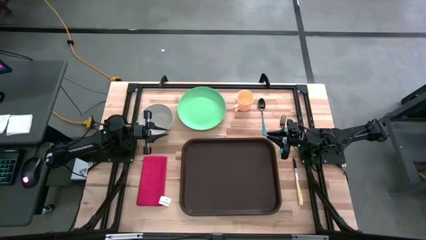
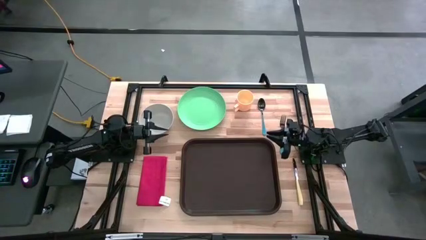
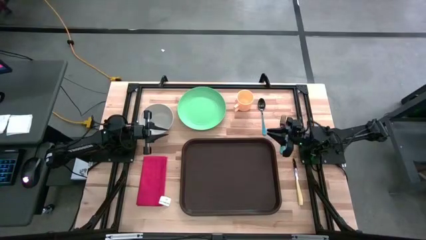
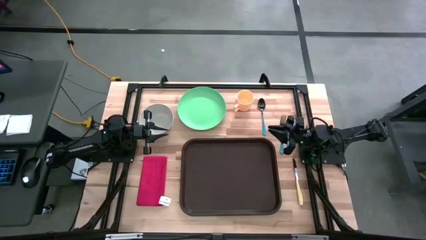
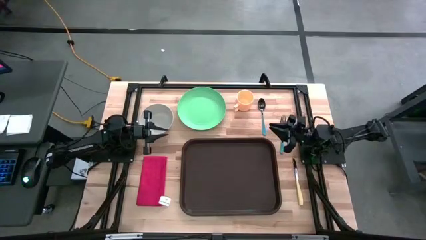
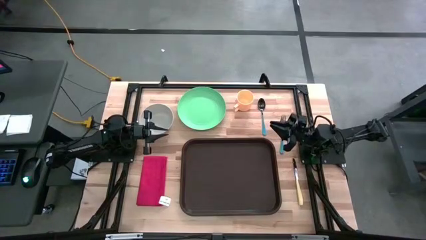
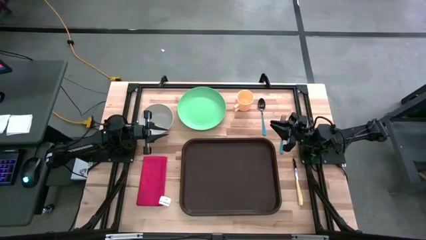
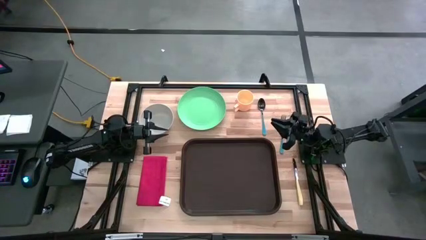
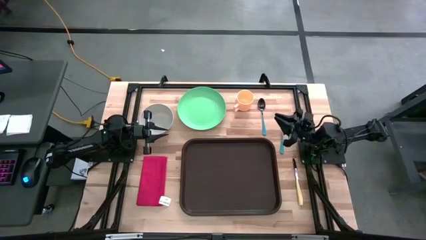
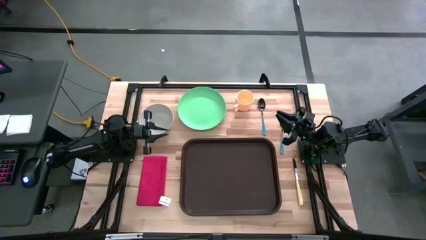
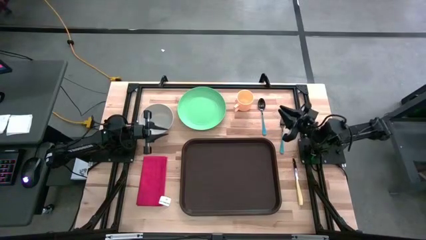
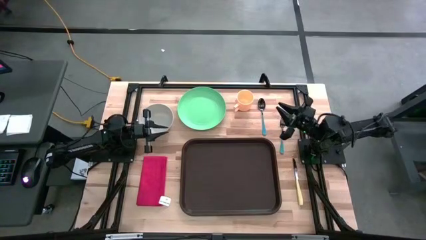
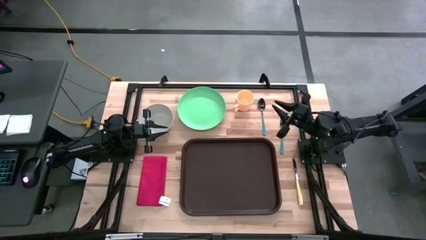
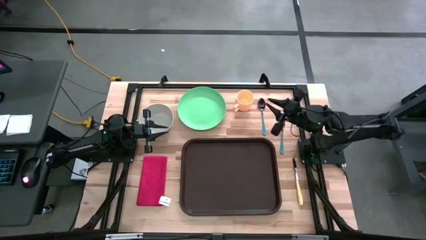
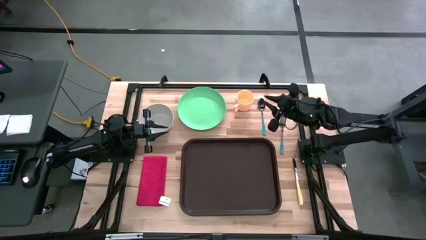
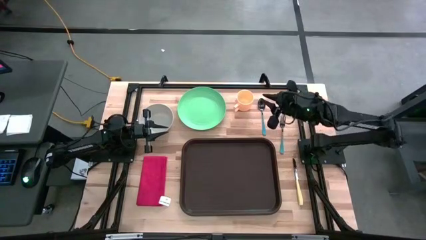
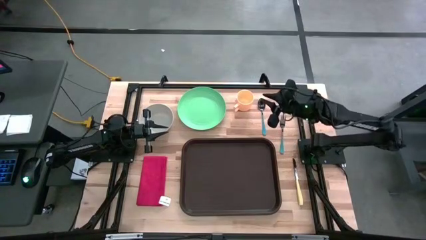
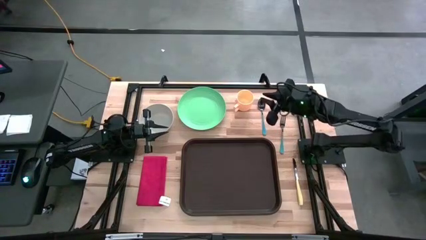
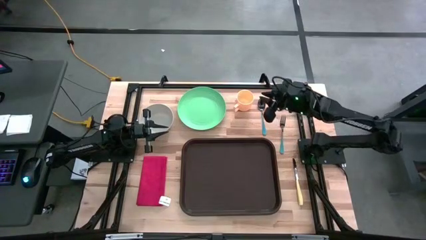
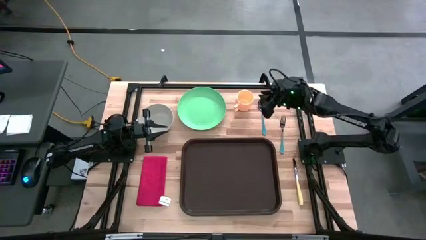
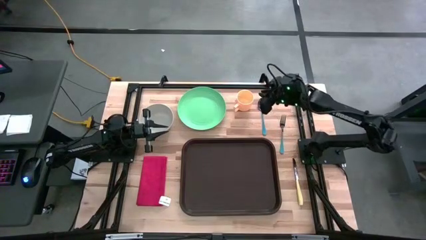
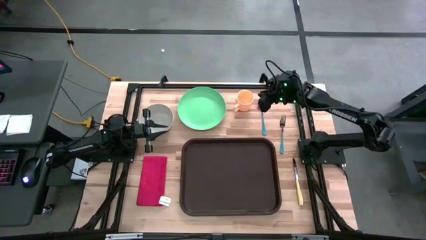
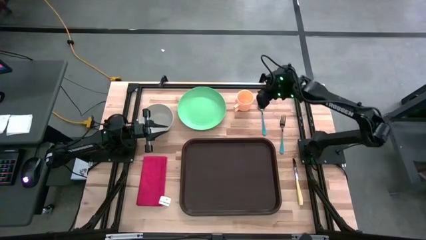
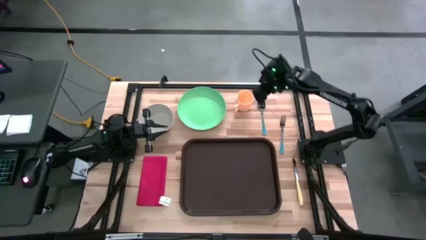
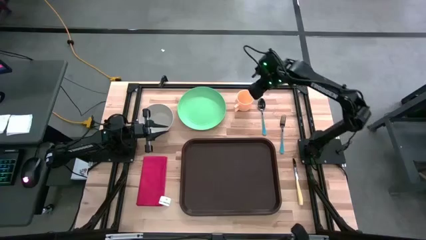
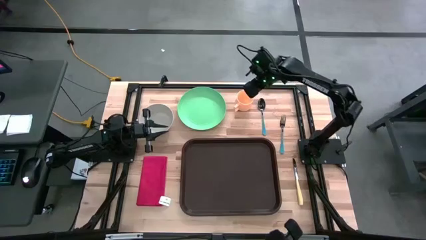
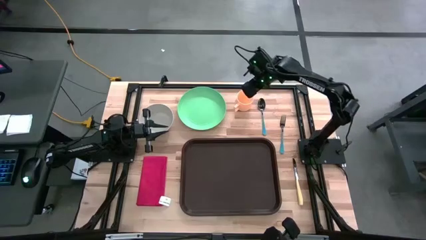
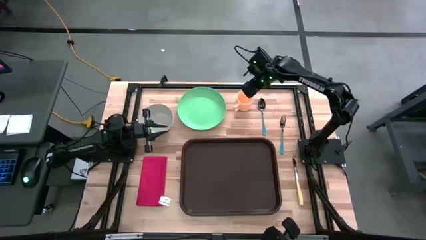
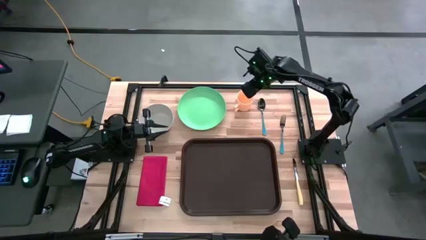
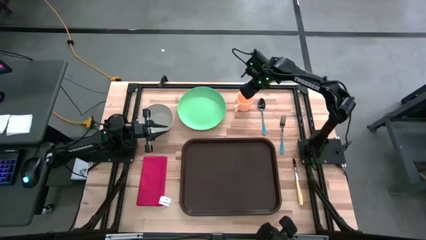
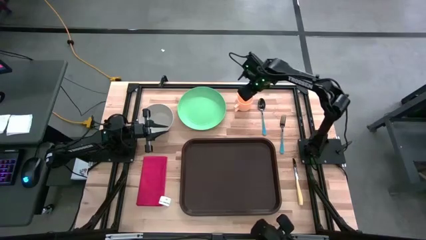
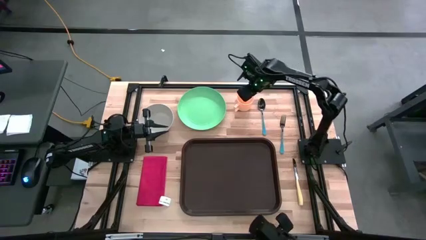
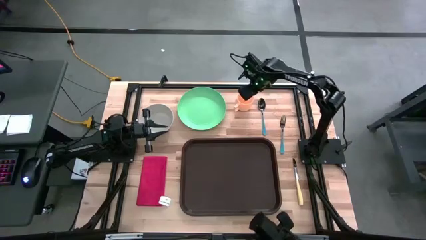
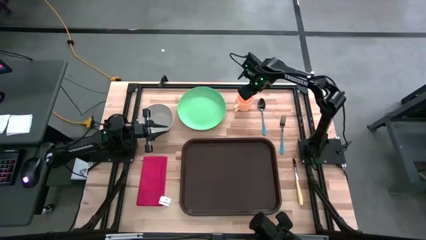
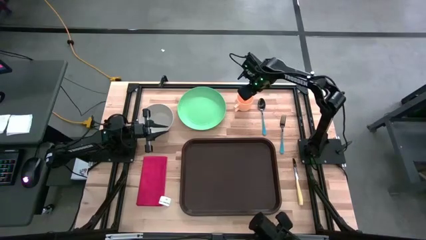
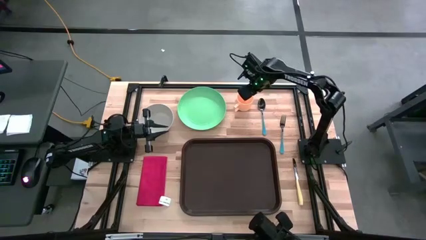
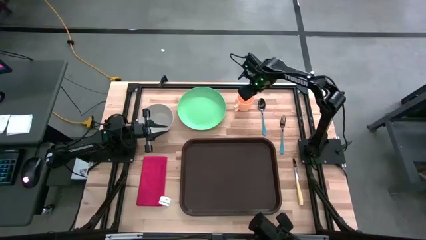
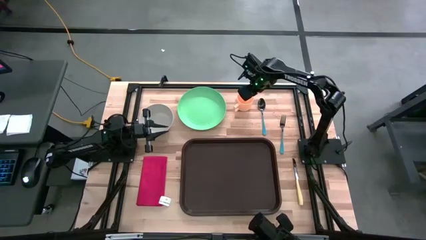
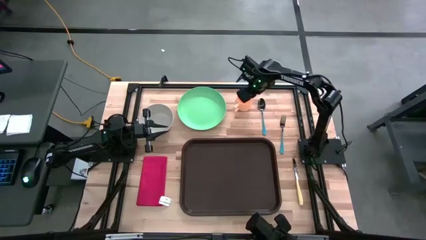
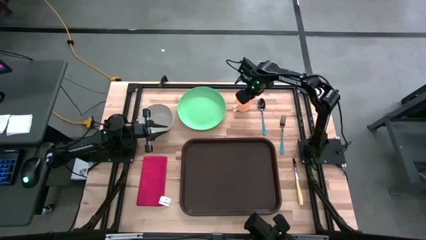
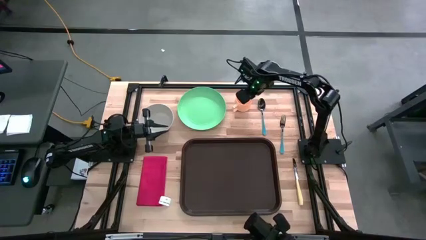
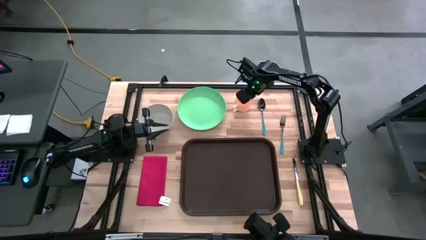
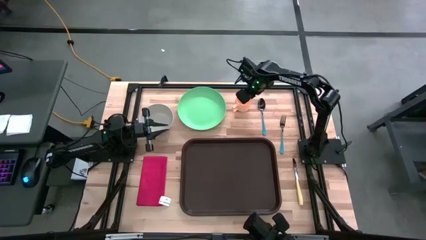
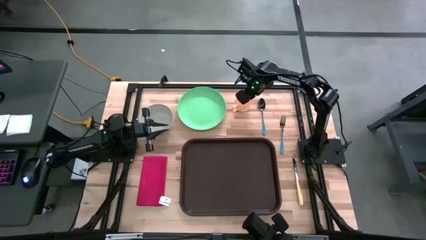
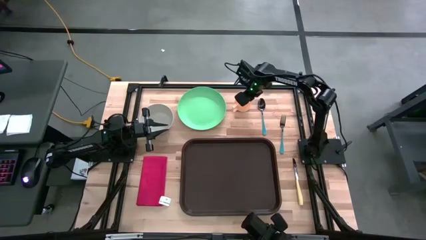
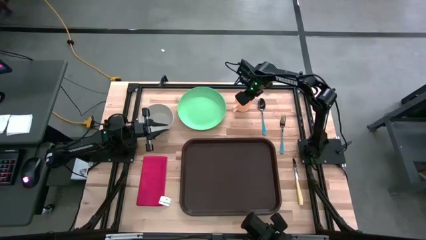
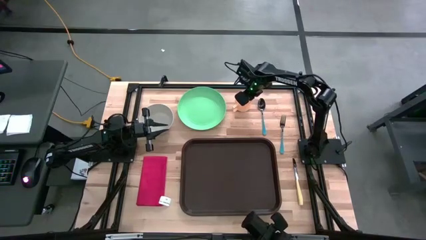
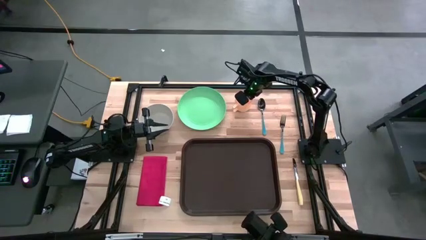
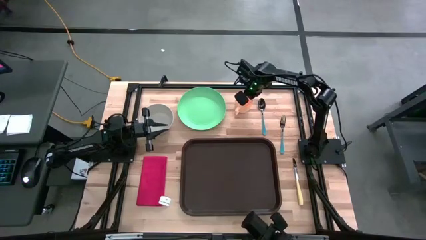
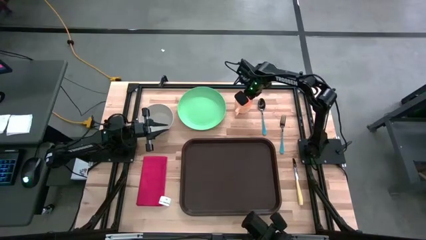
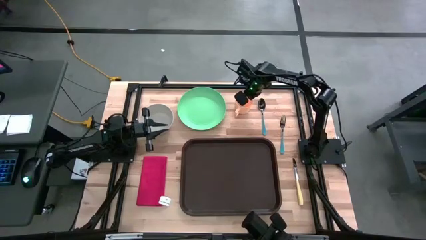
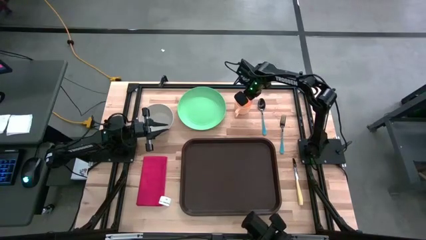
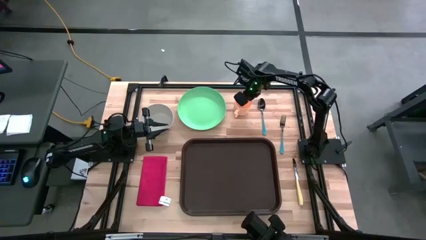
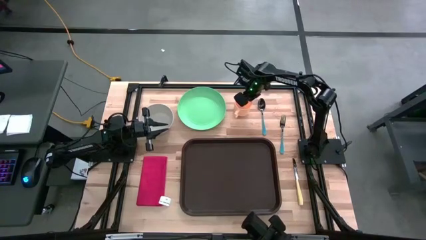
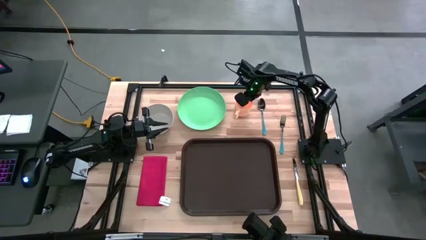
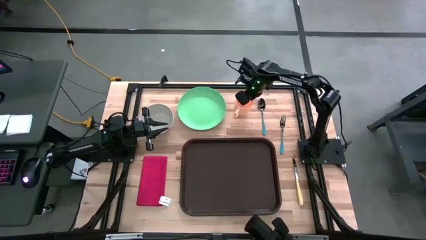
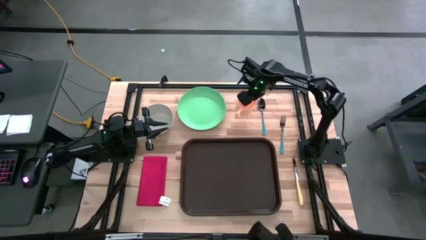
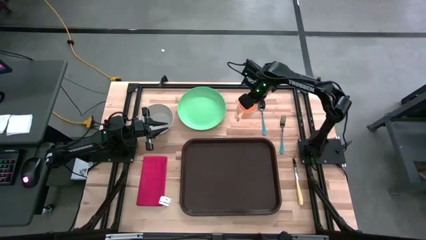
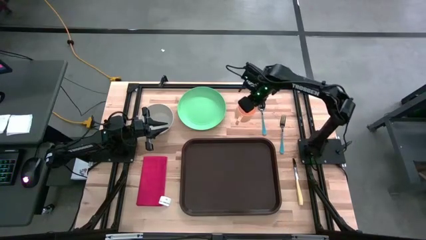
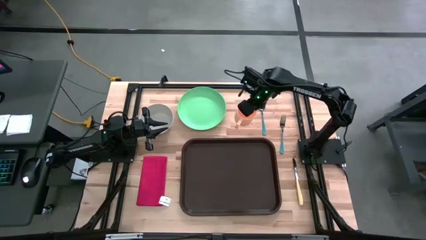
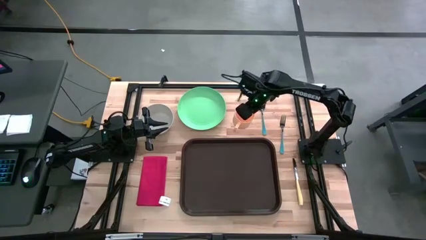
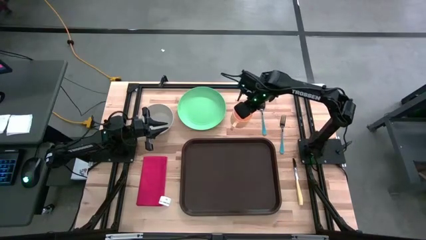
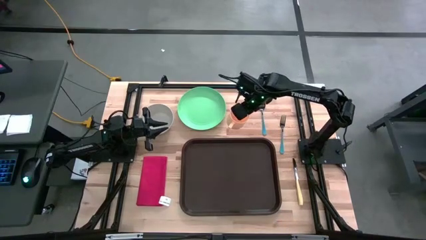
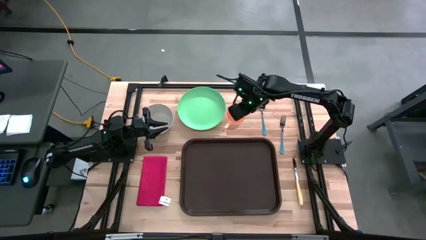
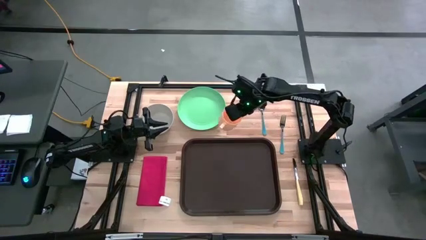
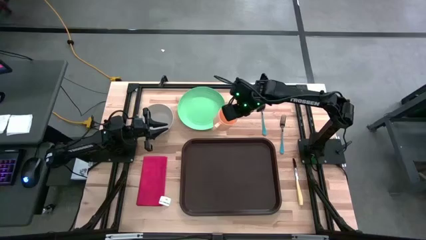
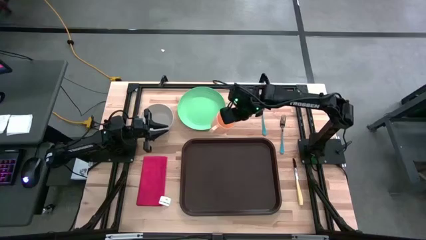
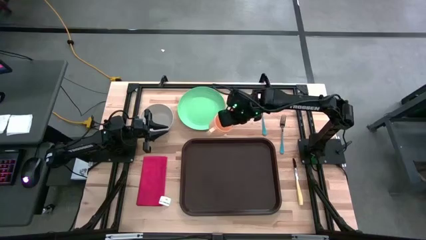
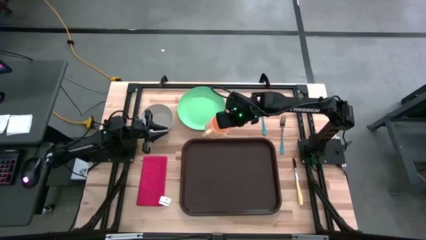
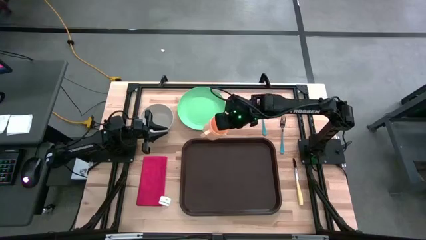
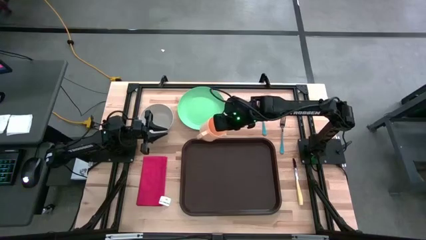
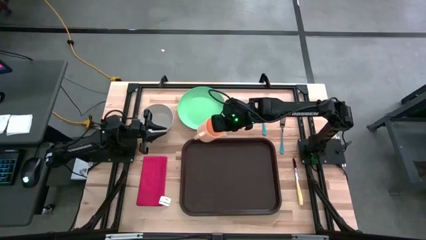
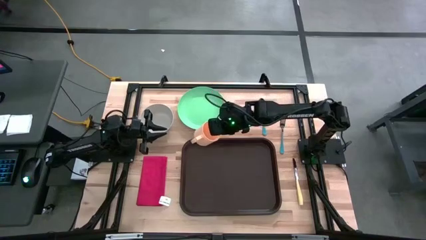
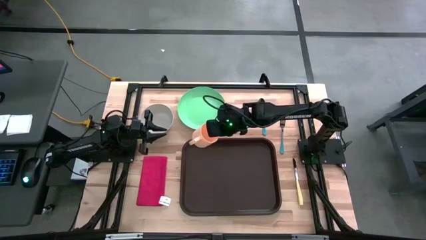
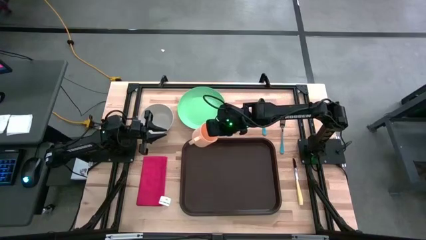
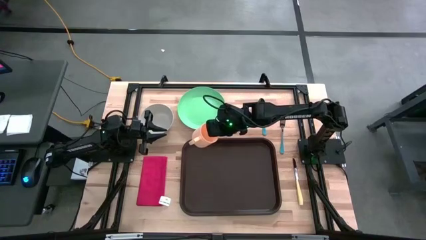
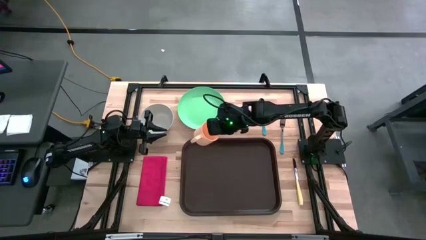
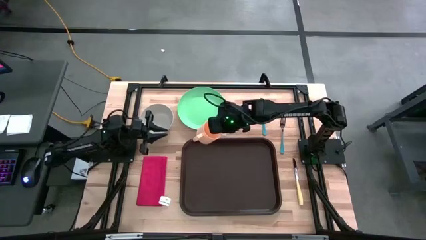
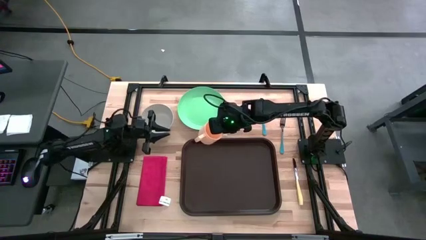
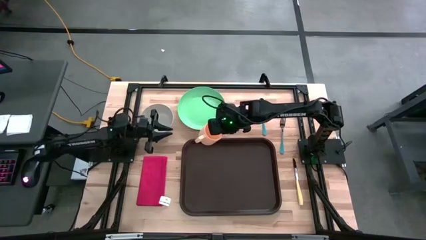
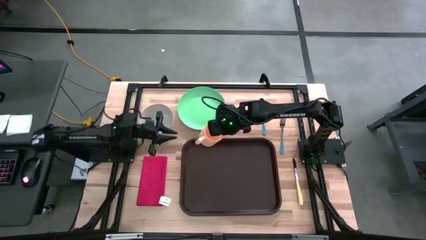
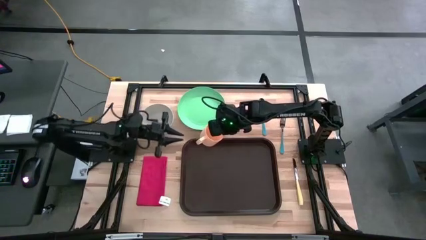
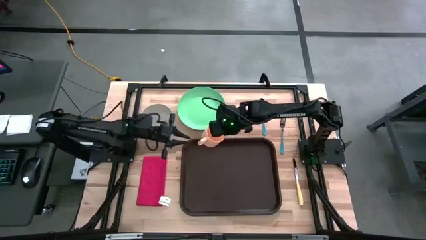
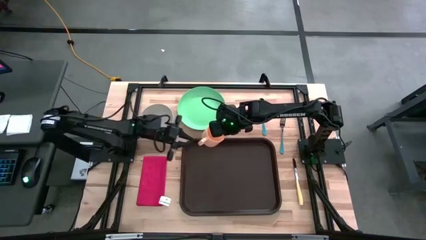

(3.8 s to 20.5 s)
Task: Set up tray
Put the orange mug on the top left of the black tray
